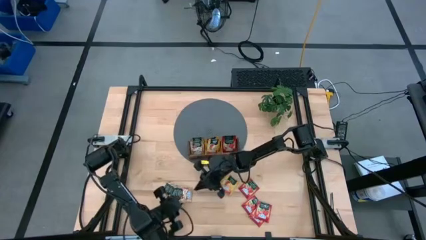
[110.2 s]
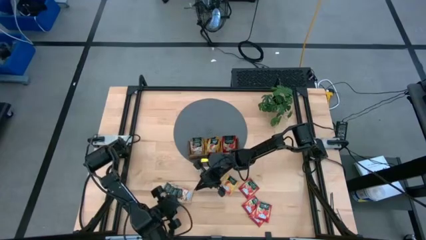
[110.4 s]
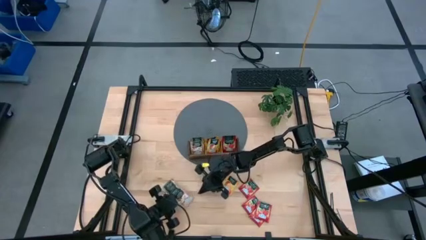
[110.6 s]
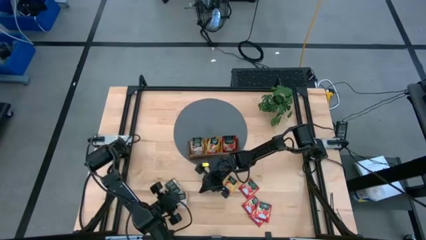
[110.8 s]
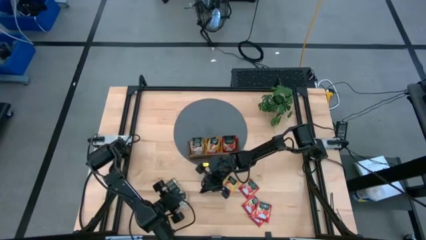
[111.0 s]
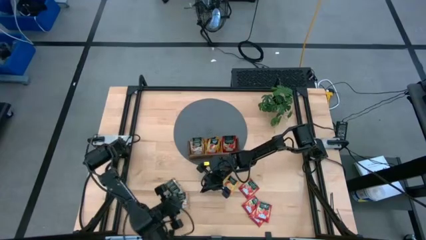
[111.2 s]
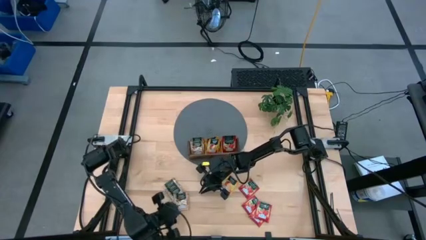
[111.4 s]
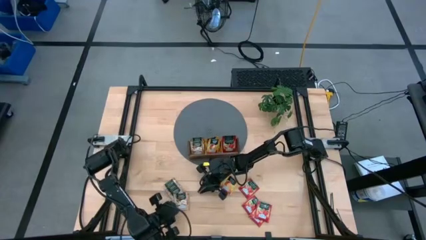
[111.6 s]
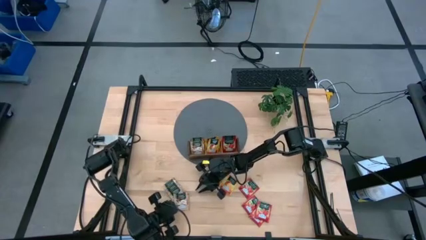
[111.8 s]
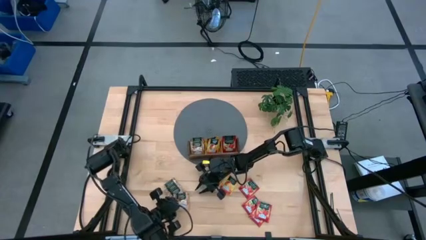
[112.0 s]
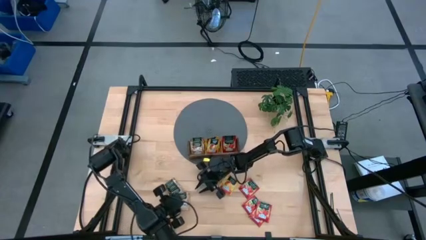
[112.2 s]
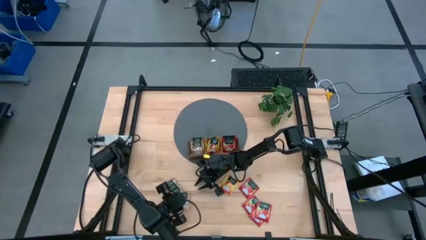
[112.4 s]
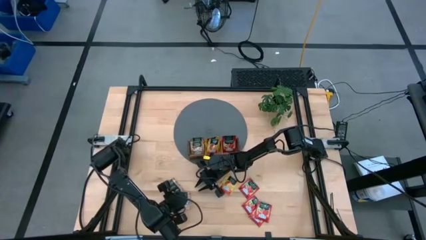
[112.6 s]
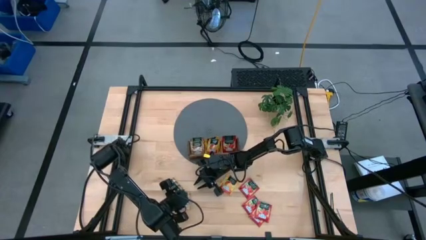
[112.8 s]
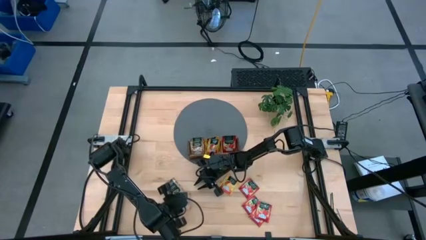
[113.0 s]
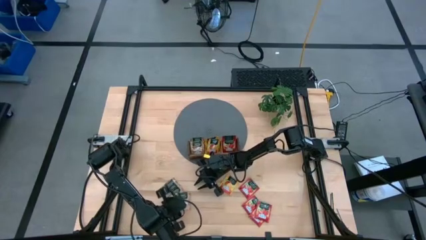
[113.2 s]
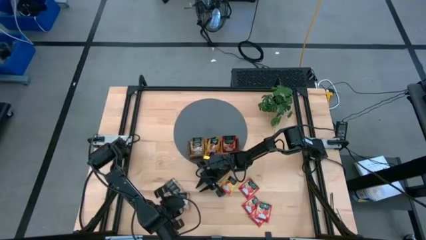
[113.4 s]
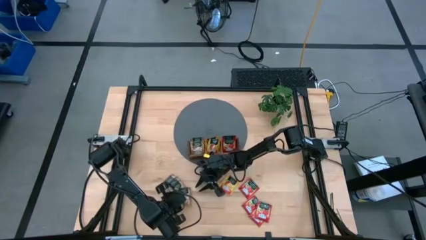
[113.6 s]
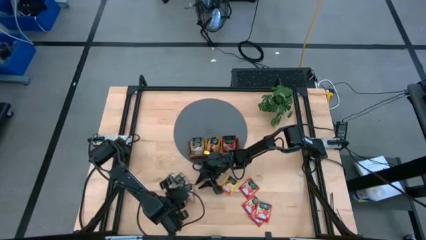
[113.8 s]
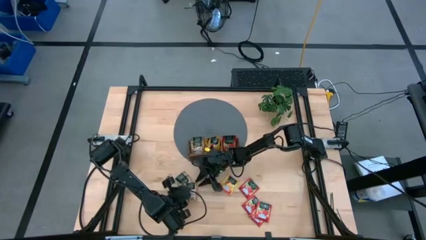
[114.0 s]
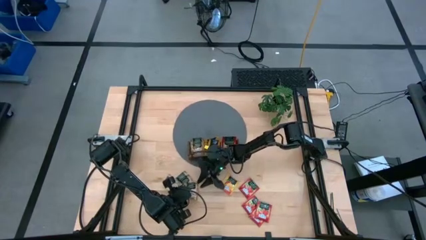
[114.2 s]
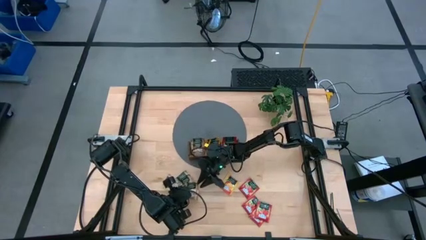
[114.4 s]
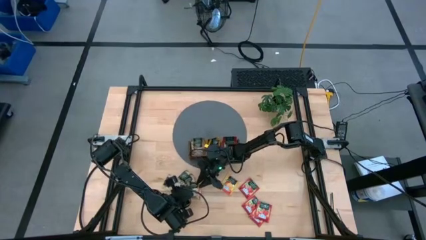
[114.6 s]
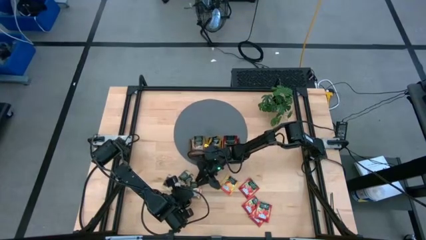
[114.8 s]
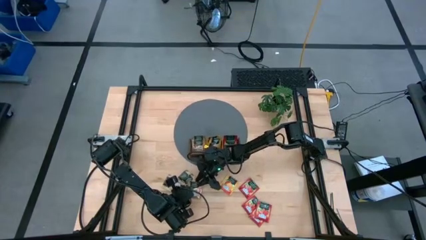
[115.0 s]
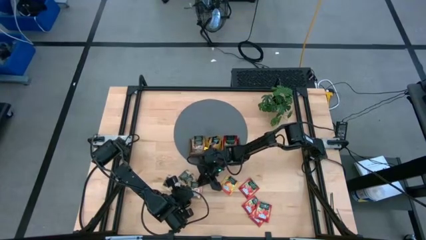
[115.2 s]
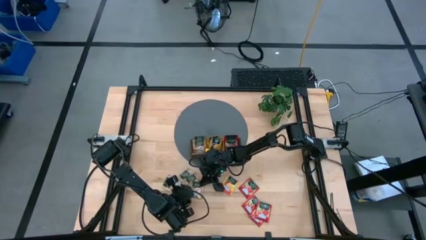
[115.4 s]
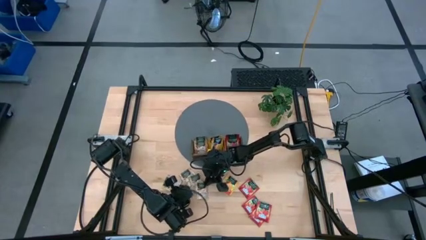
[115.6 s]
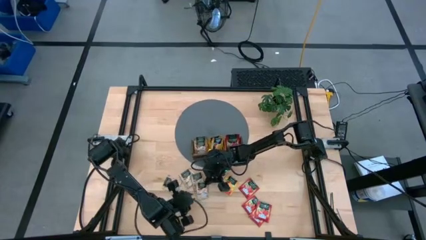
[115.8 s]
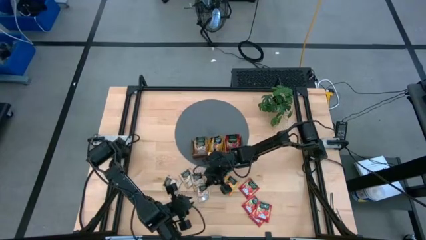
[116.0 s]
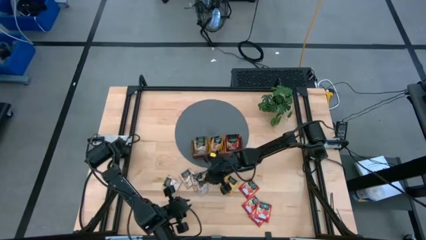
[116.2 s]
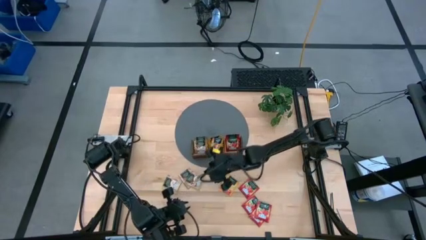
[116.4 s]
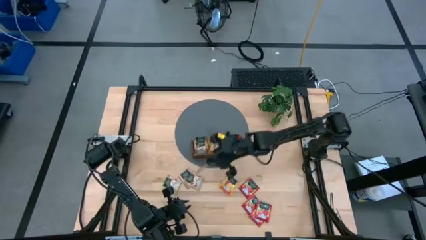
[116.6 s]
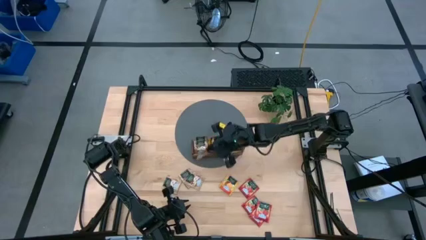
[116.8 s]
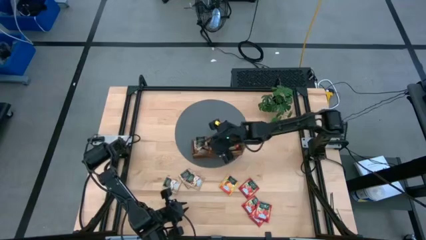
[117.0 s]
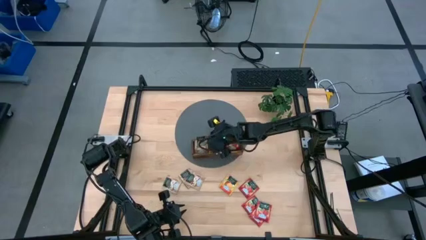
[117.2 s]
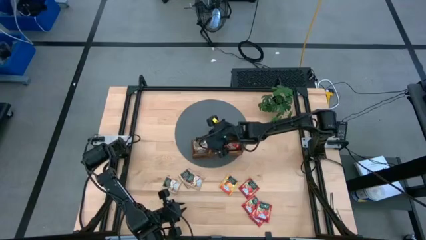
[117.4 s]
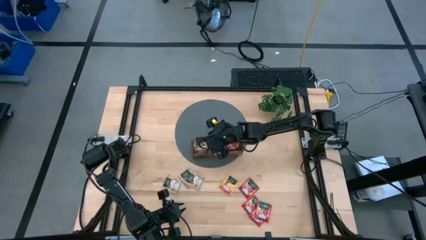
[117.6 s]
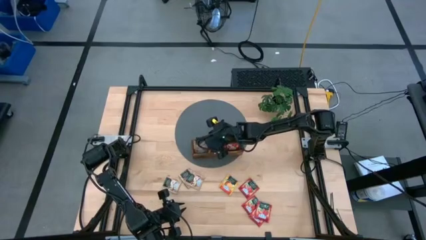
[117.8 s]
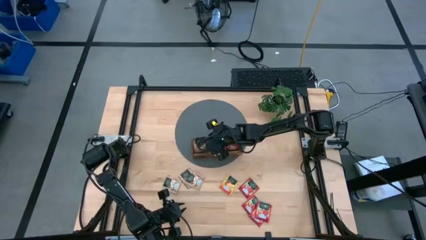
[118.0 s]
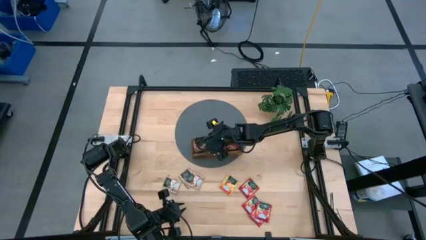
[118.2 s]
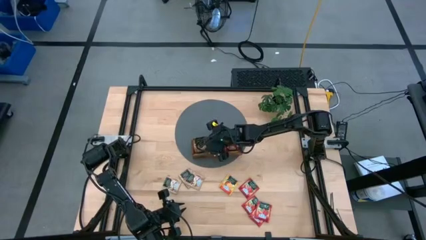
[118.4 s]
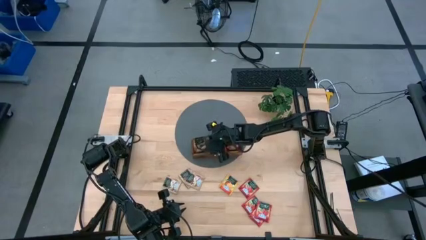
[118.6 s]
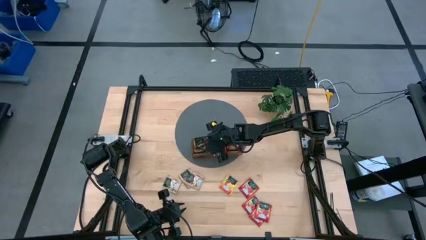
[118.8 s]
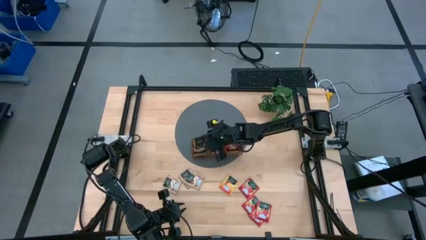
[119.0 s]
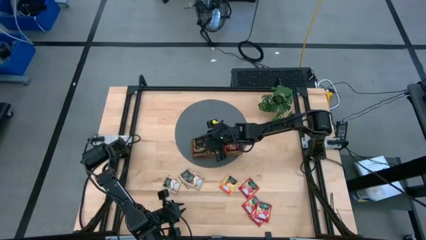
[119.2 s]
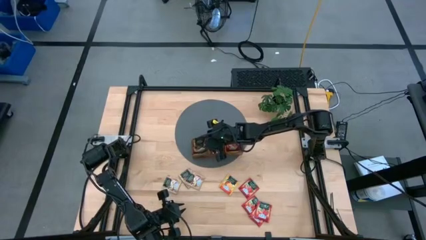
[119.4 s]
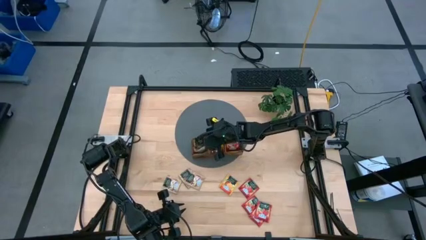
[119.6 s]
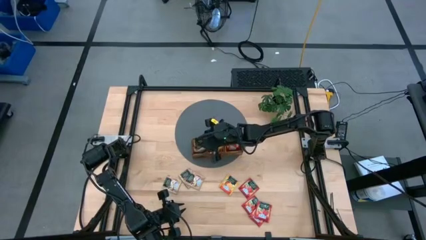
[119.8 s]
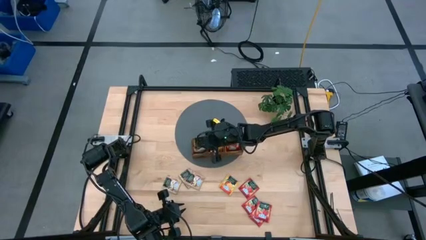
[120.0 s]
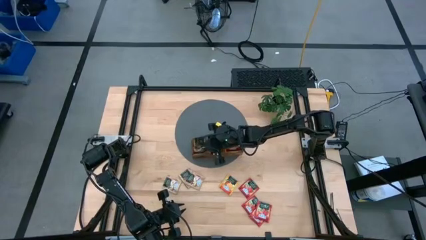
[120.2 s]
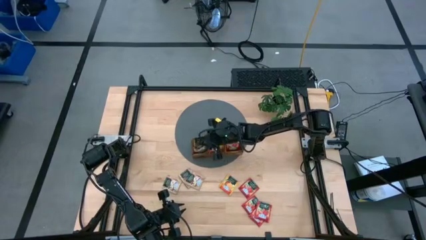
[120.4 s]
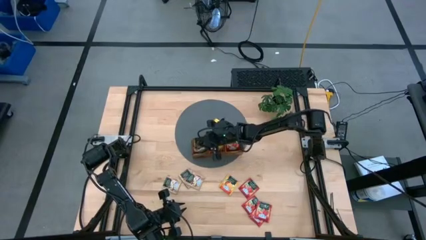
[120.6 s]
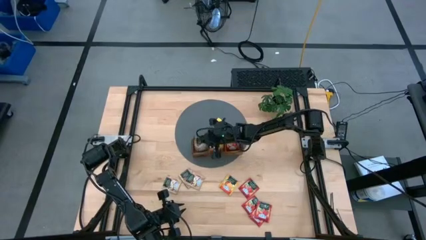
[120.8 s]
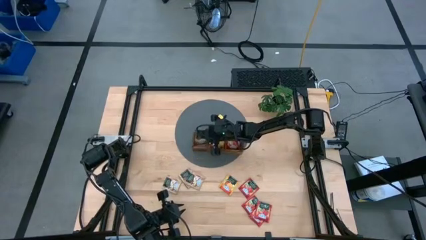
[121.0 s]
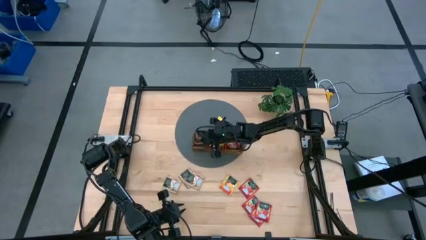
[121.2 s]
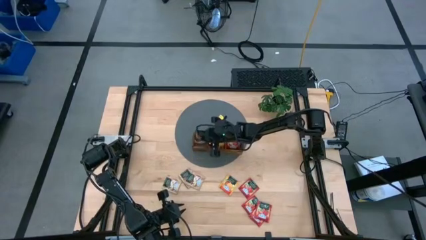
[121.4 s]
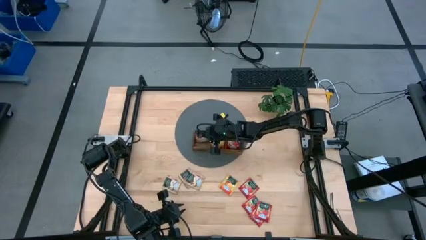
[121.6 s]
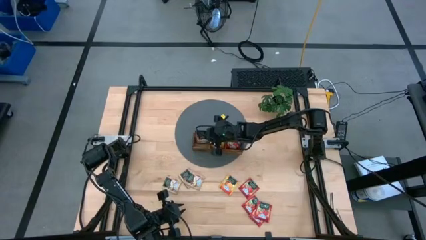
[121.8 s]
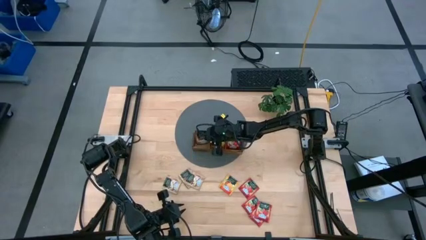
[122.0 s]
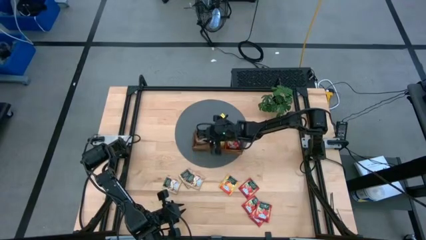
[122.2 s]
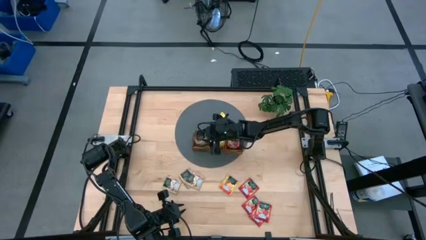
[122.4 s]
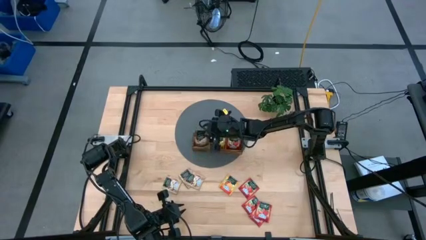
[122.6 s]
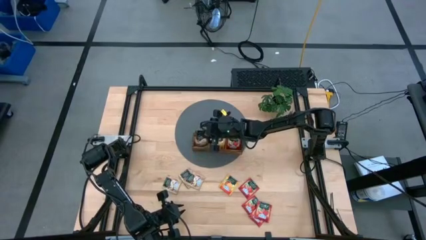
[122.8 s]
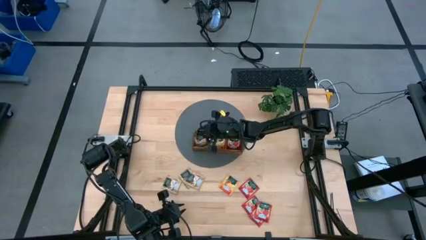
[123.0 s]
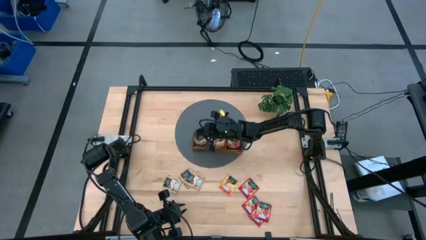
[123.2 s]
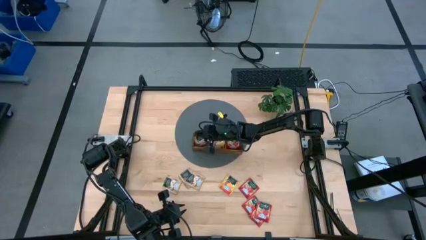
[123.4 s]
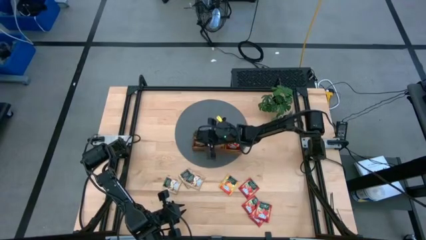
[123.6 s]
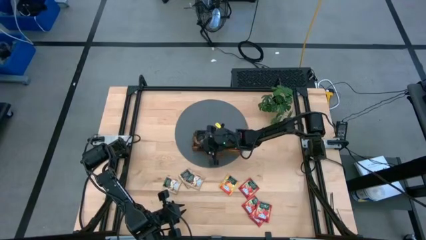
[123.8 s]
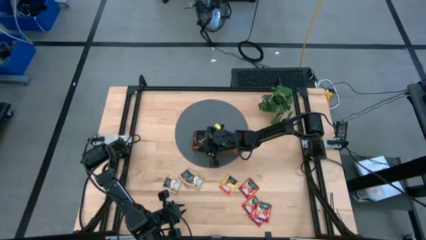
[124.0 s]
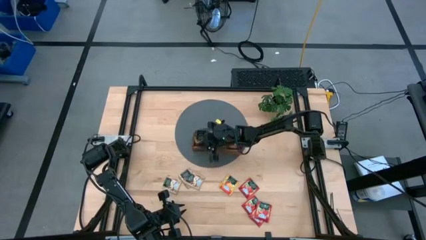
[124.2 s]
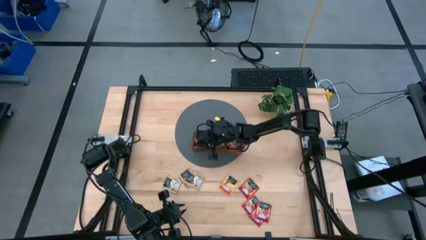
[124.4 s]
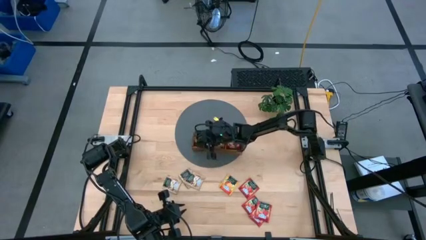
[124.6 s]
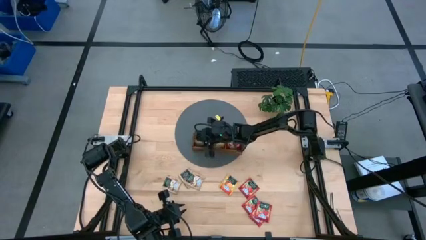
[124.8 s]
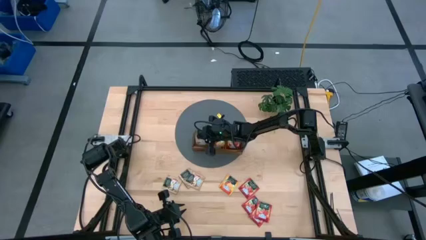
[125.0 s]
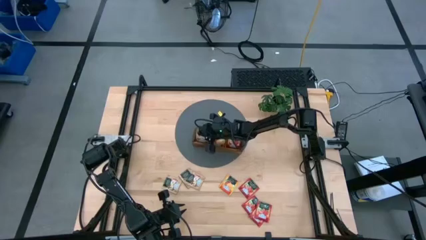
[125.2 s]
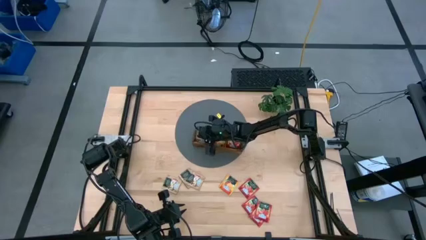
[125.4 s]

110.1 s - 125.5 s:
Task: Pick & Place Tea
Put the brown tea bag into the left section of the wooden organizer

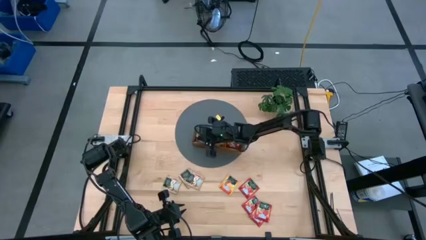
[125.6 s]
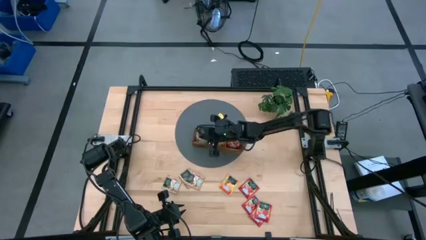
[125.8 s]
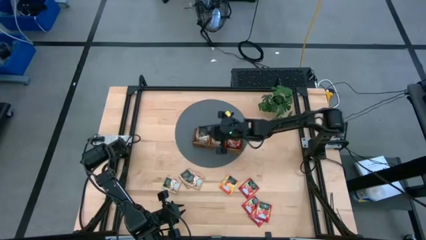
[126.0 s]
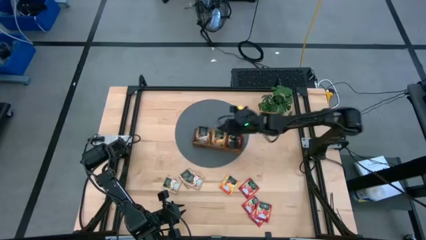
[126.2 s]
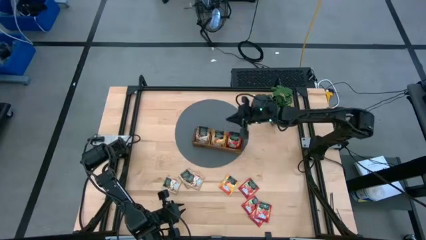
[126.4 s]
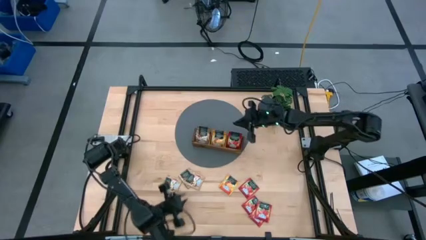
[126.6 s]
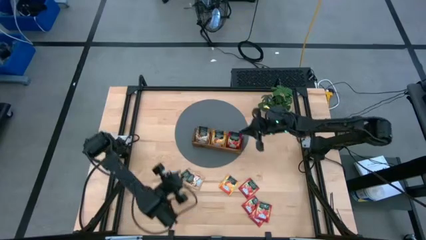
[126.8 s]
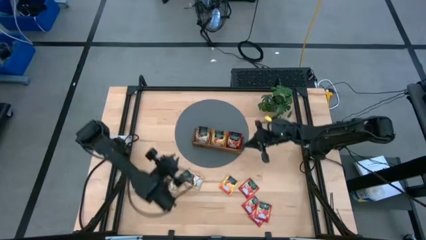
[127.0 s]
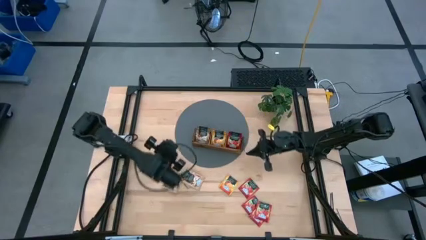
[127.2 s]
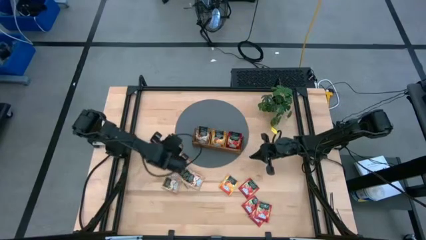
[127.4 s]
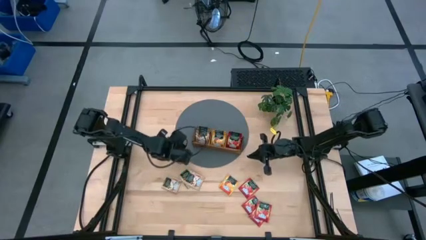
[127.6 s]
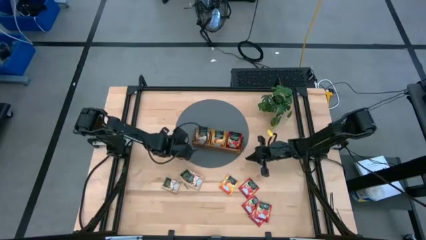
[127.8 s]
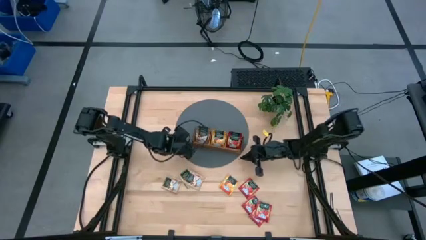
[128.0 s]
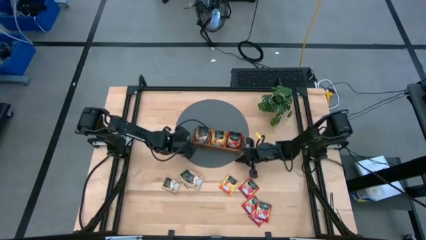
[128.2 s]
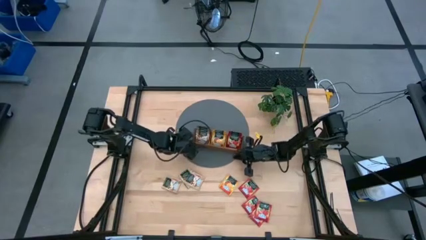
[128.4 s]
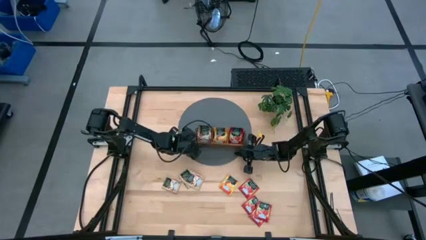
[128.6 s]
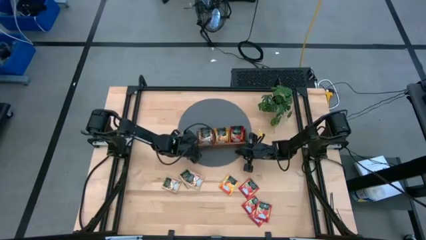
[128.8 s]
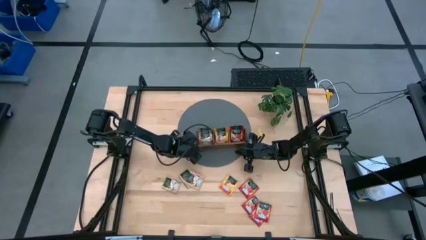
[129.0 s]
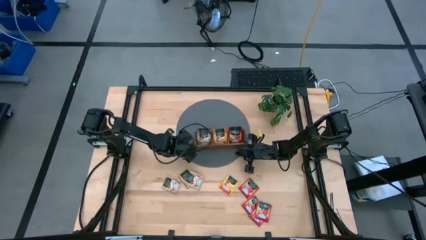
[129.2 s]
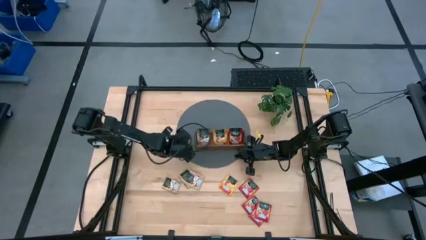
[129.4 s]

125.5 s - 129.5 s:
Adjust the wooden organizer
